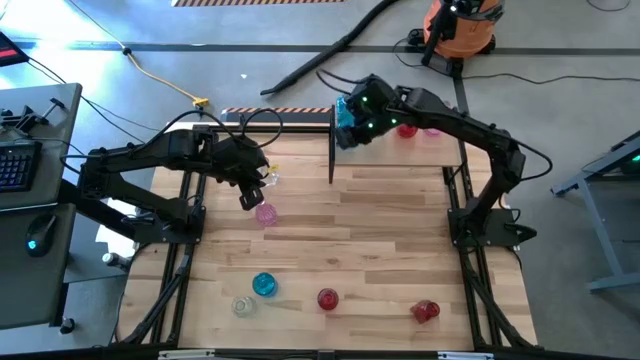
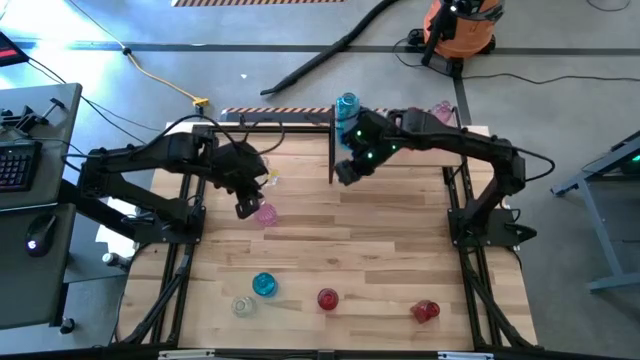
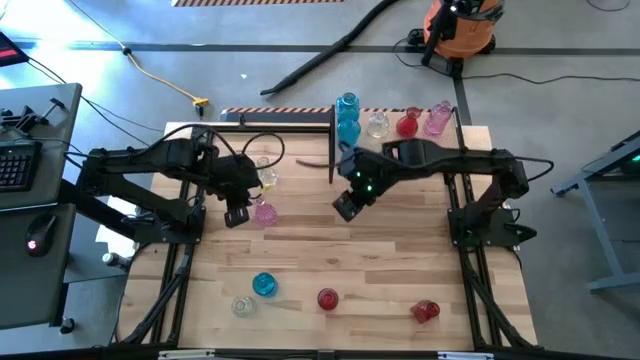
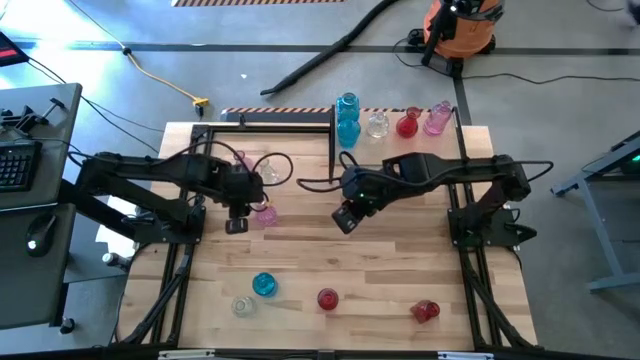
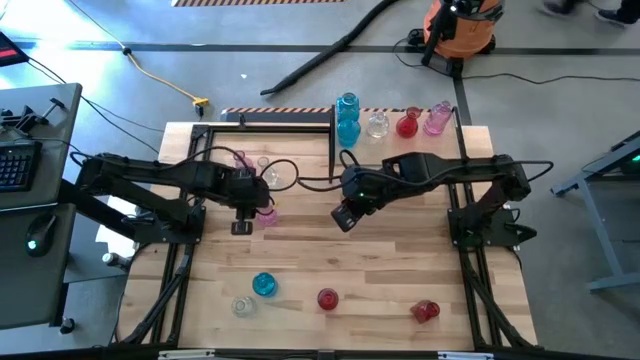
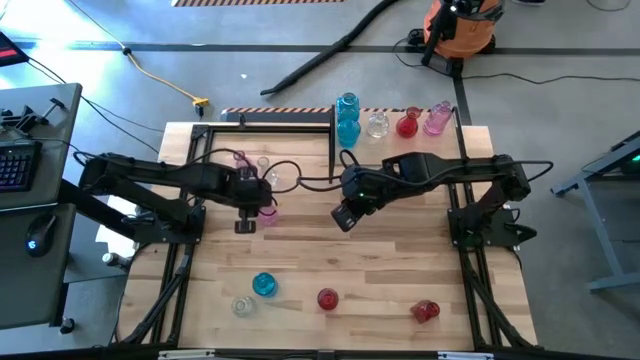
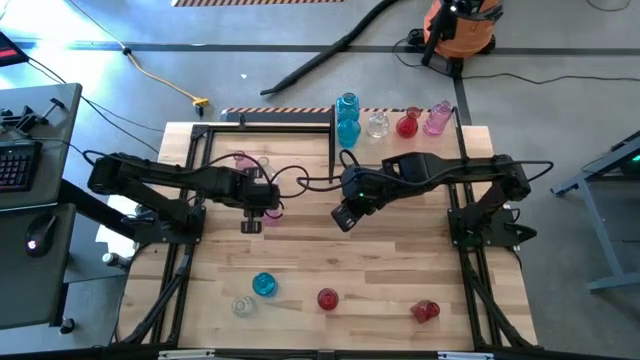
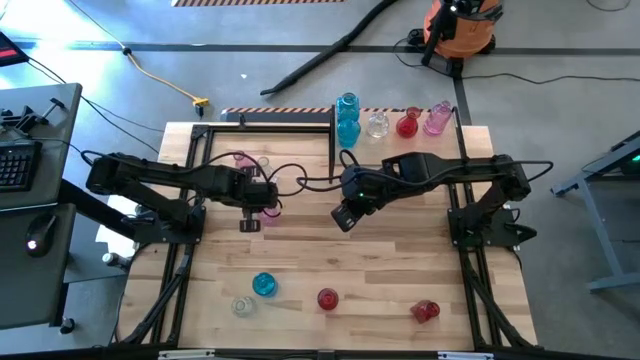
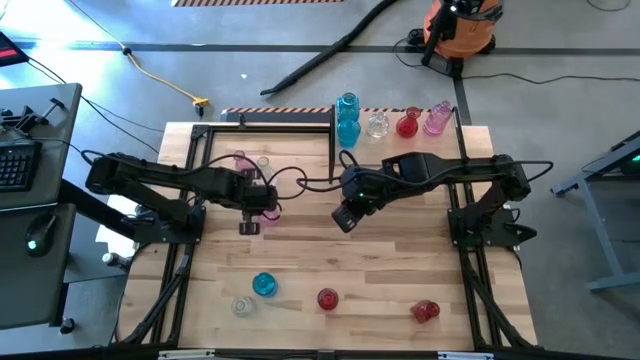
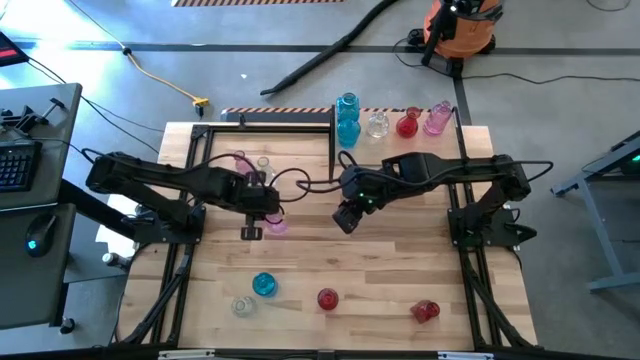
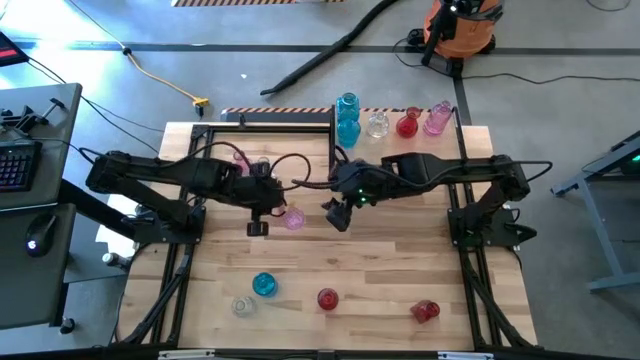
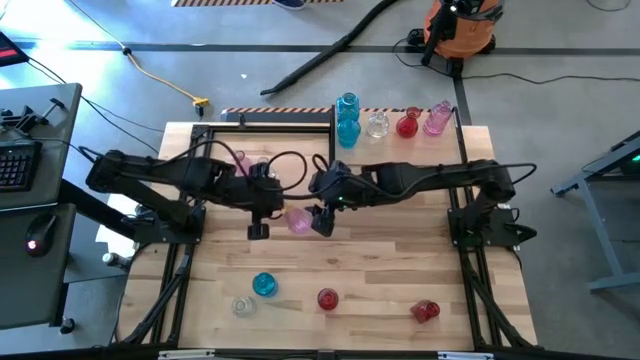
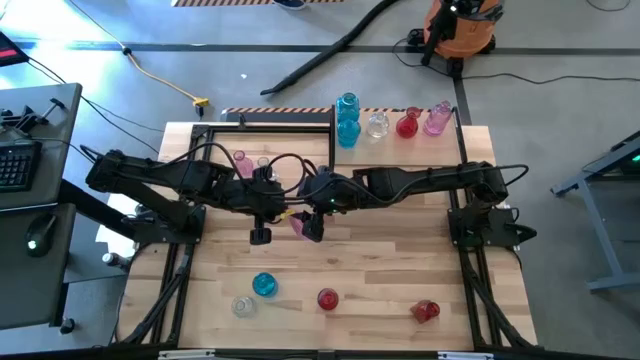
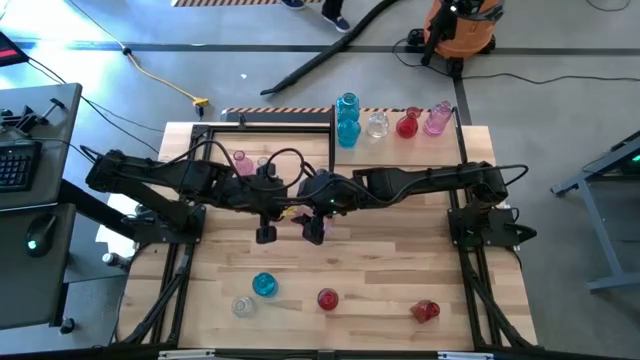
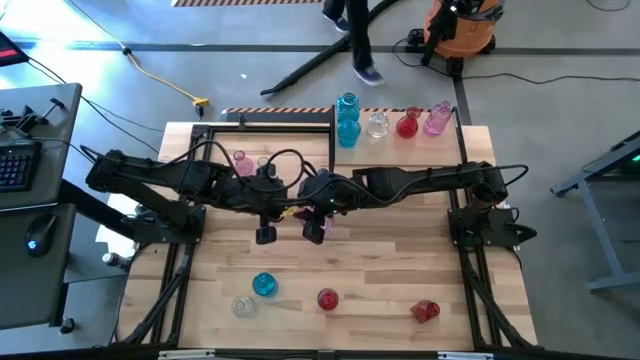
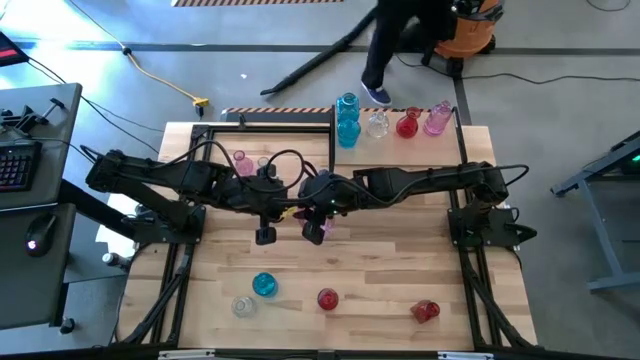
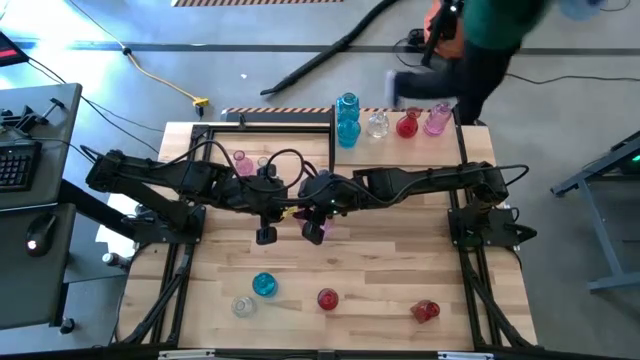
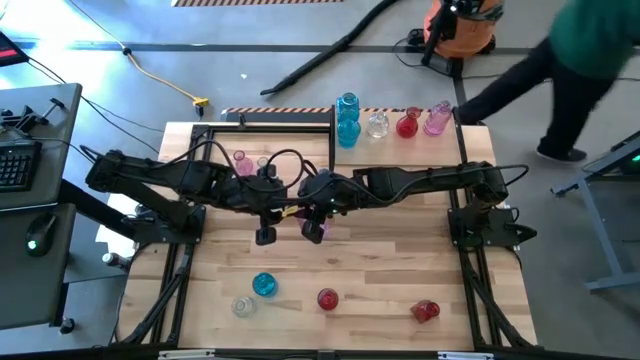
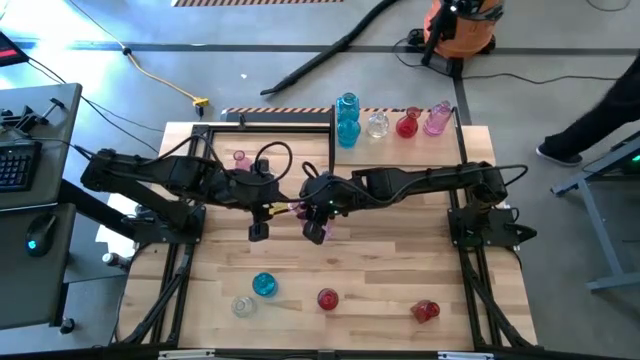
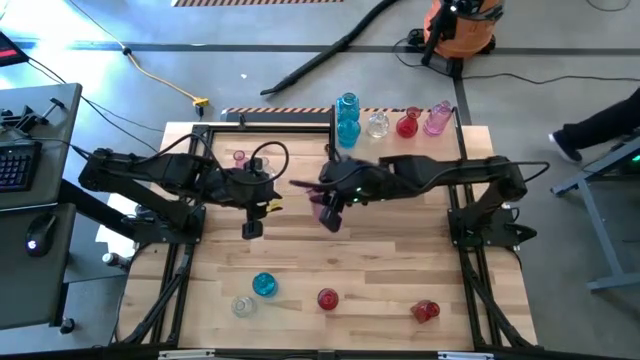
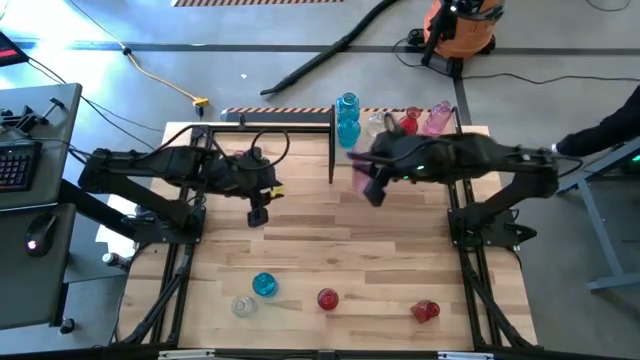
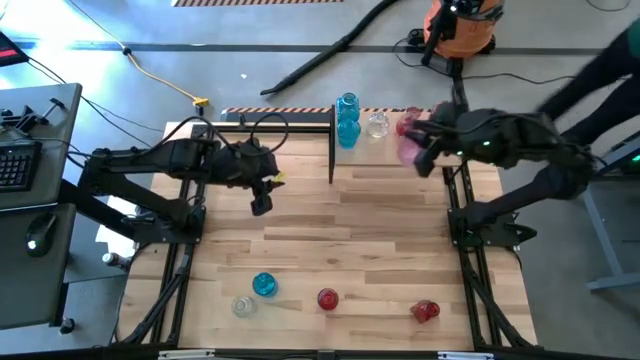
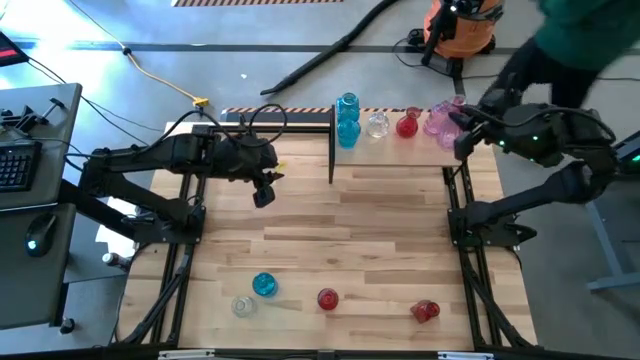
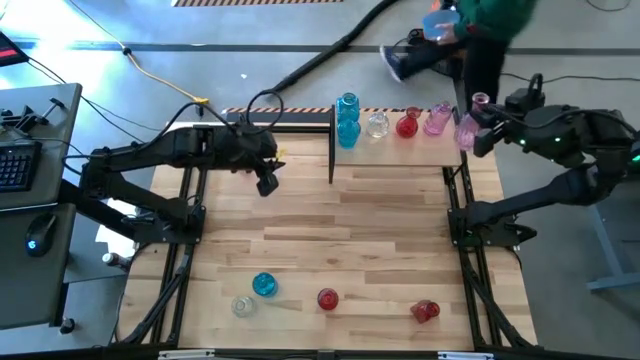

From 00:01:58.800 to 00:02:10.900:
Task: sort vases onto shelf
Put the bottom purple vase on the shelf aligned with the other purple vase

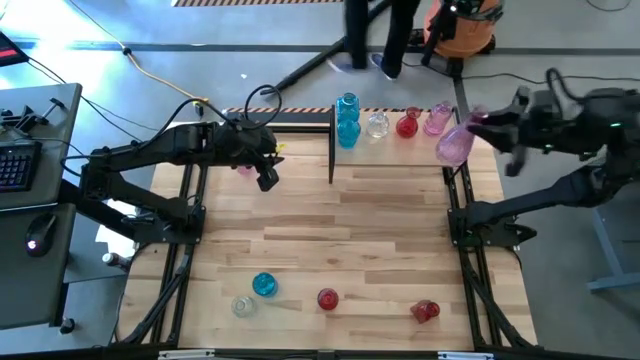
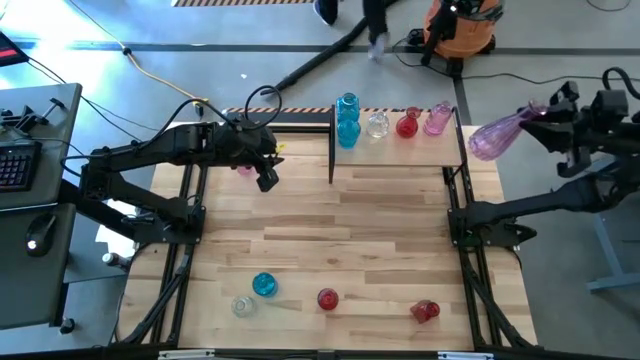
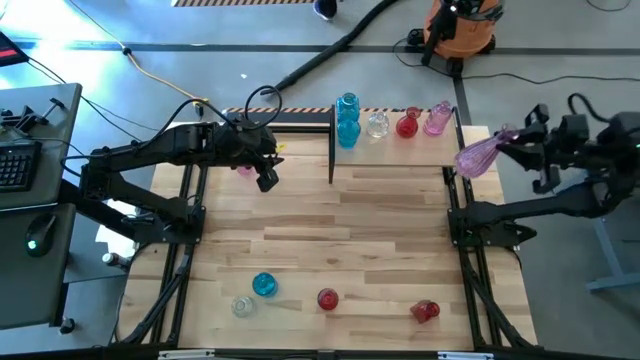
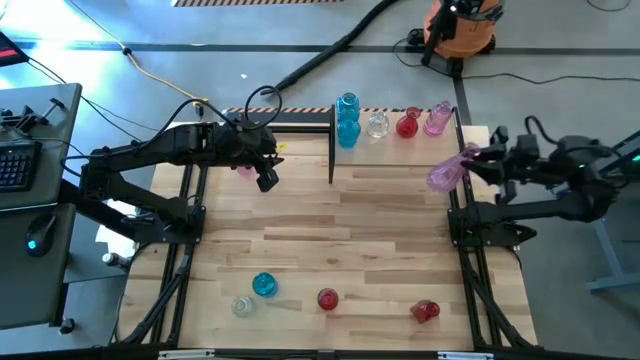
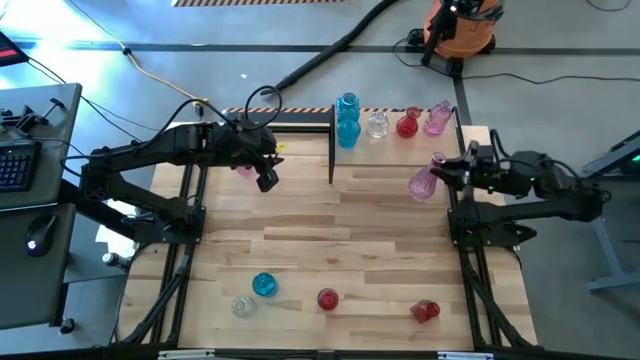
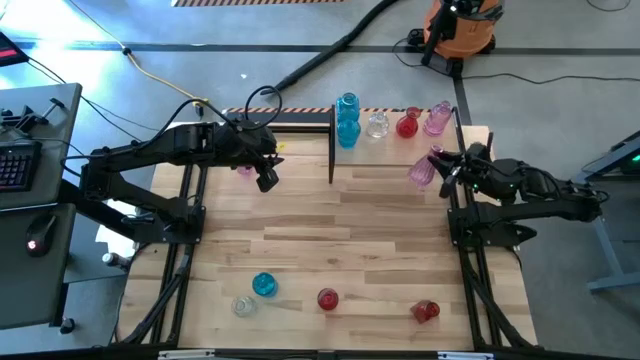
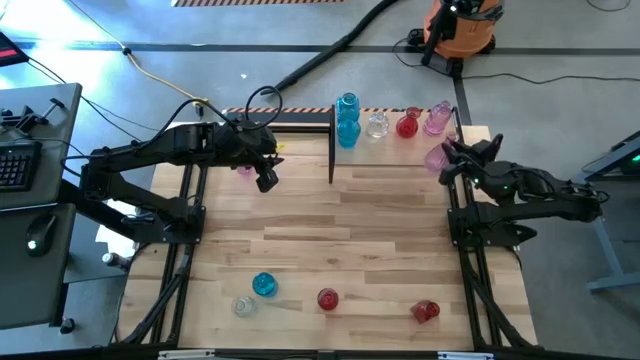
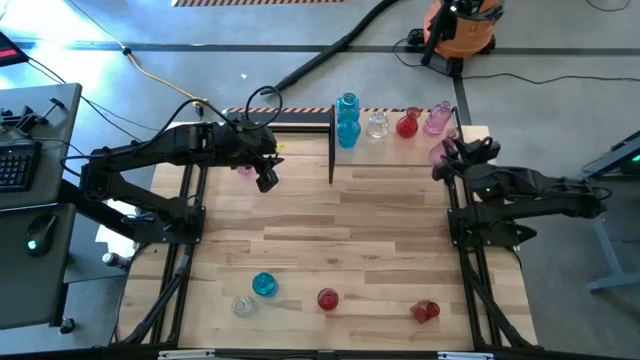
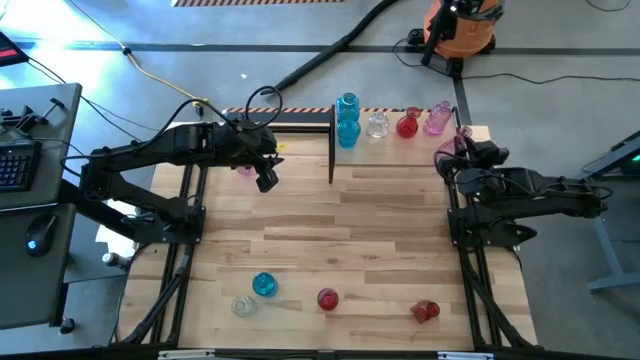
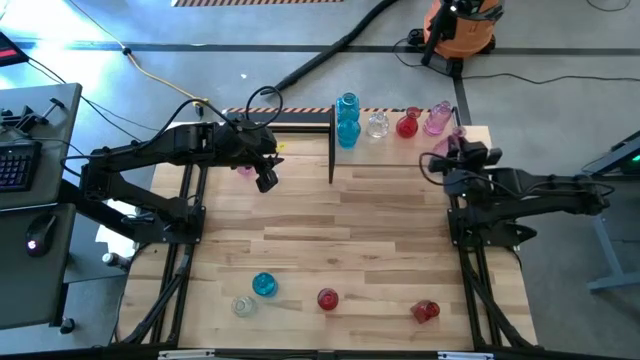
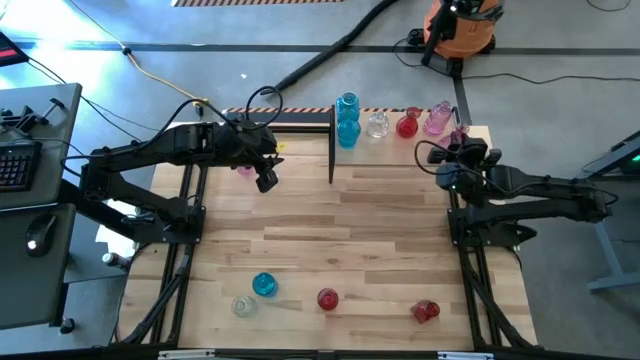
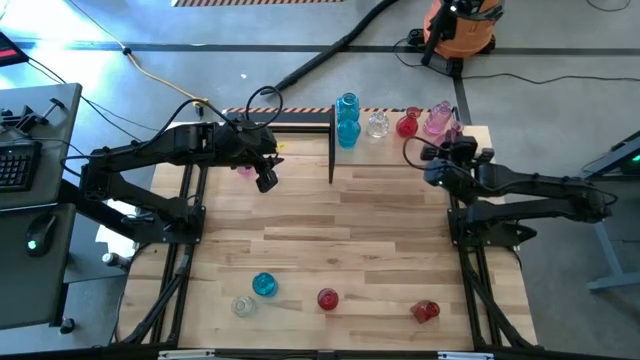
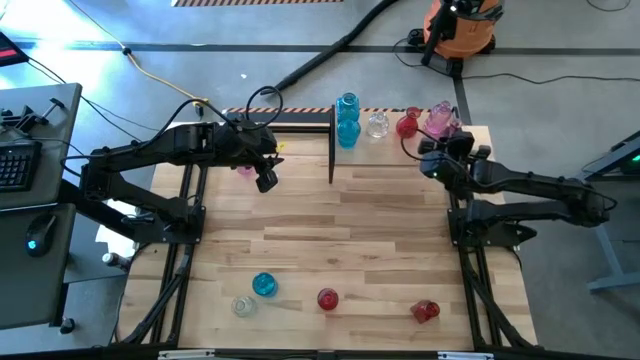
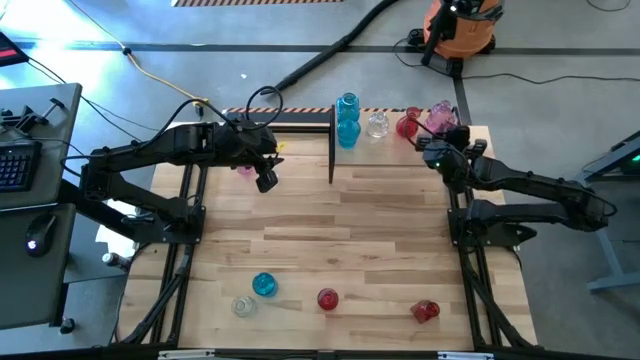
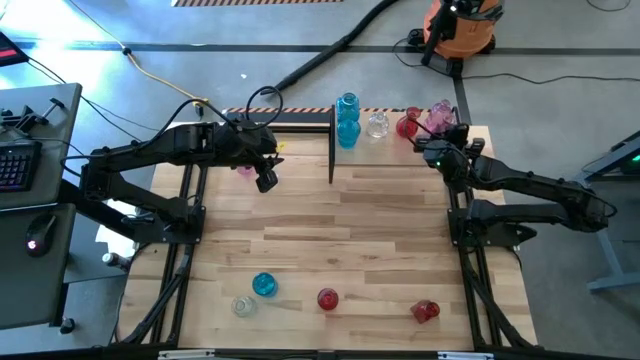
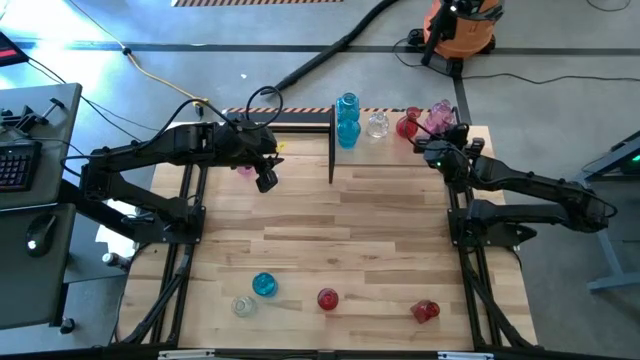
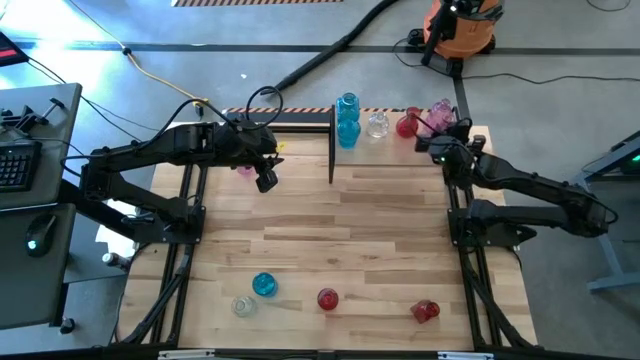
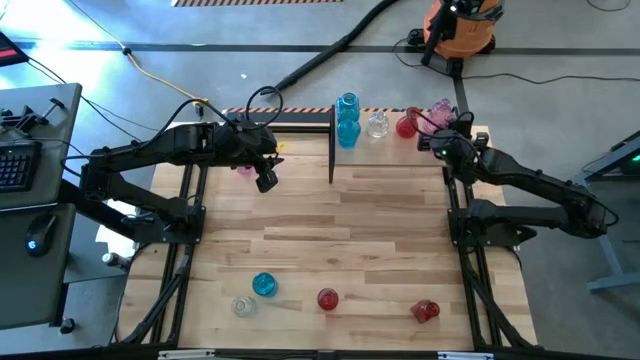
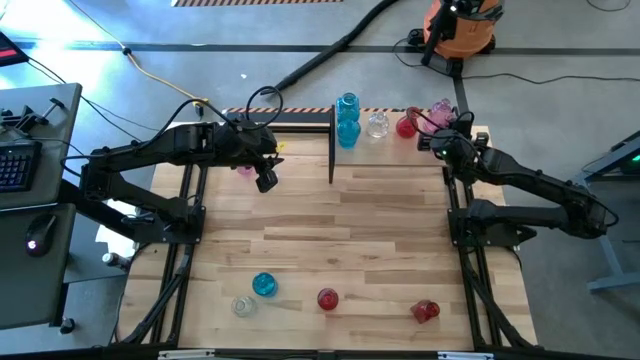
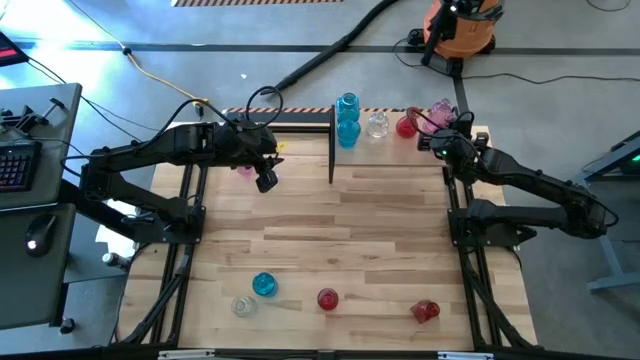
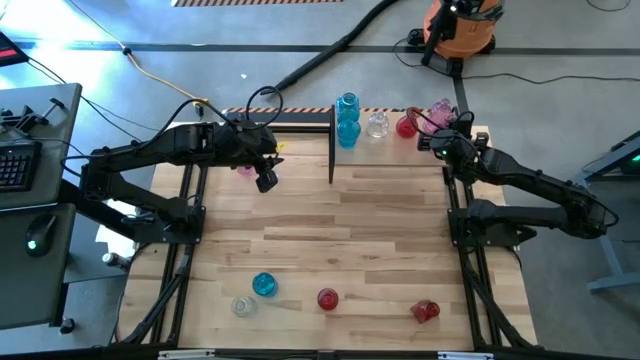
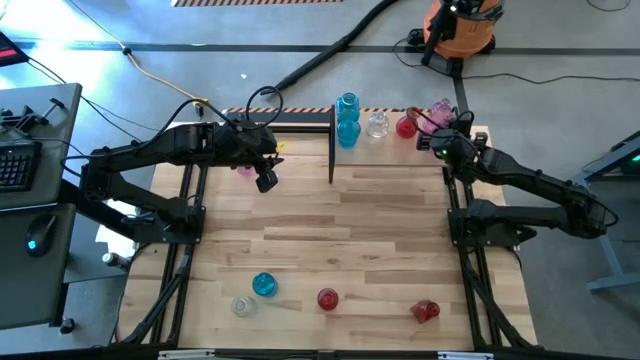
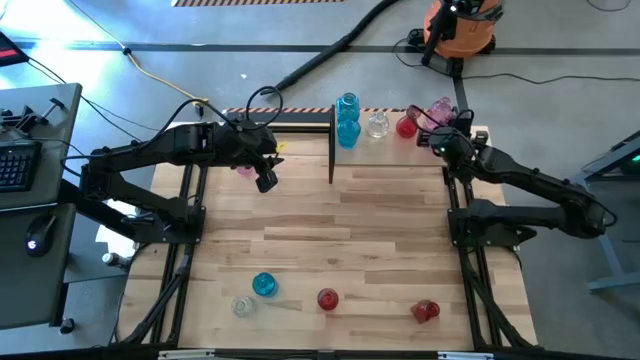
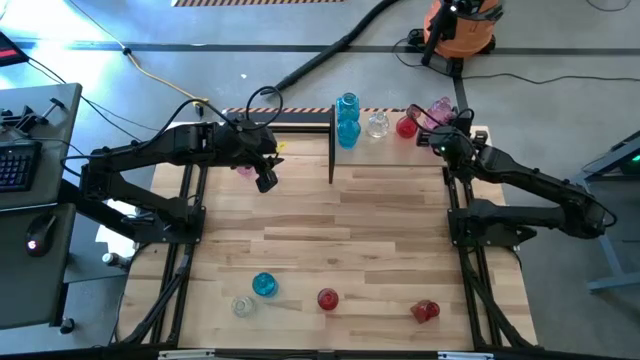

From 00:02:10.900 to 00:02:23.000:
Put the bottom purple vase on the shelf aligned with the other purple vase
